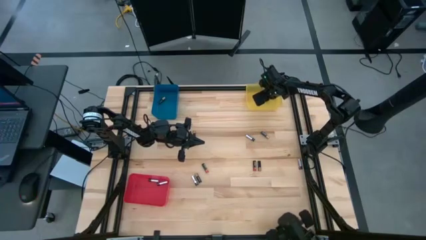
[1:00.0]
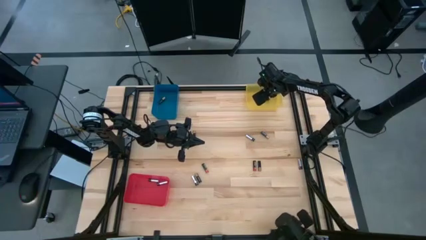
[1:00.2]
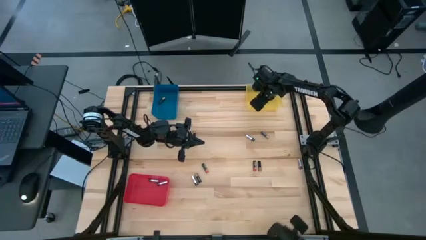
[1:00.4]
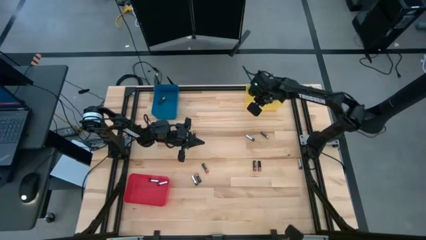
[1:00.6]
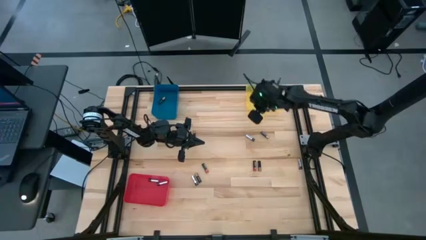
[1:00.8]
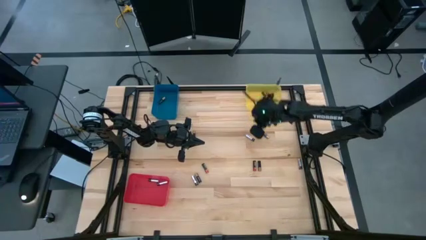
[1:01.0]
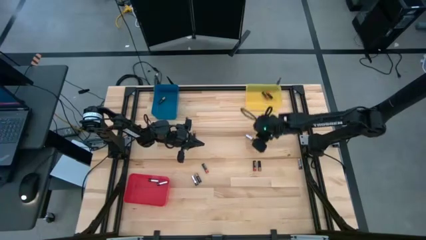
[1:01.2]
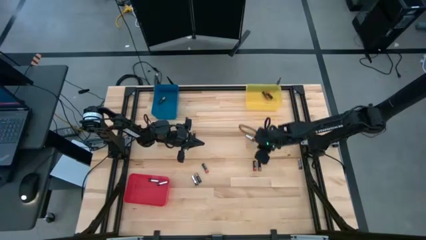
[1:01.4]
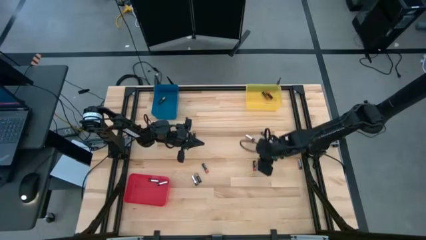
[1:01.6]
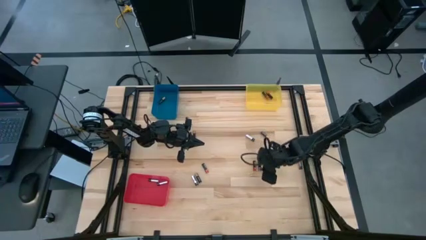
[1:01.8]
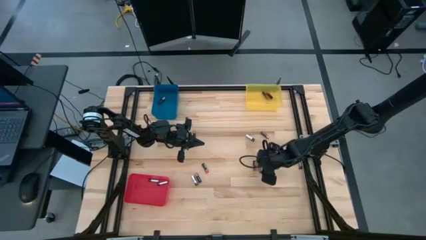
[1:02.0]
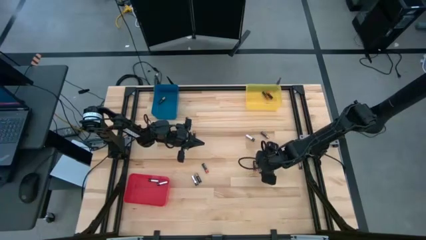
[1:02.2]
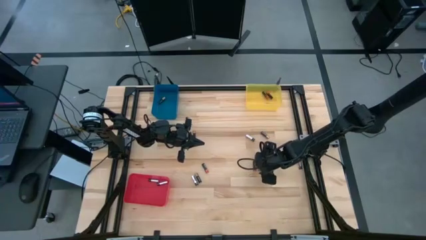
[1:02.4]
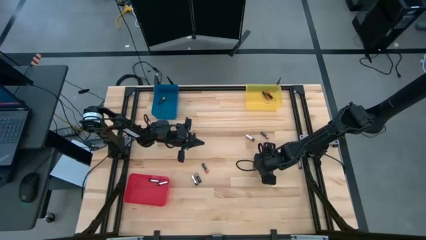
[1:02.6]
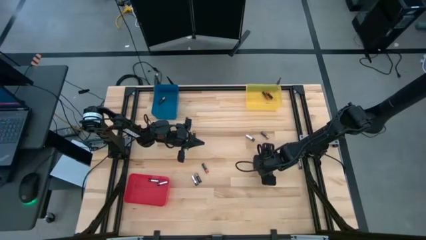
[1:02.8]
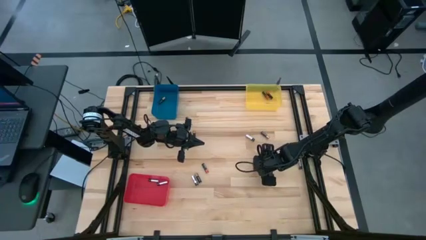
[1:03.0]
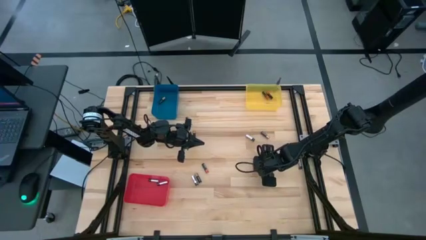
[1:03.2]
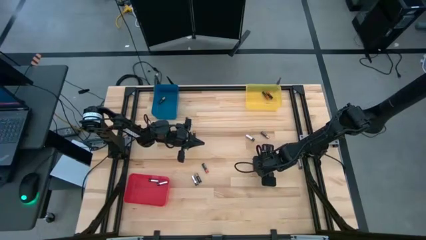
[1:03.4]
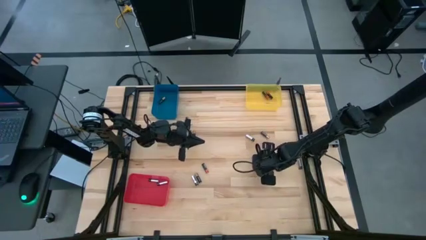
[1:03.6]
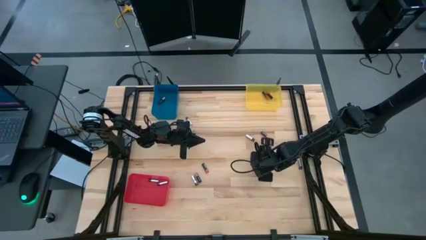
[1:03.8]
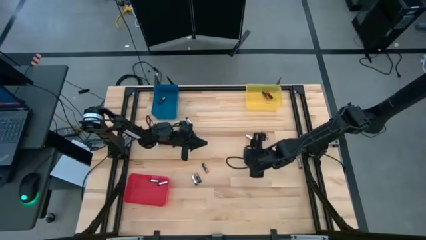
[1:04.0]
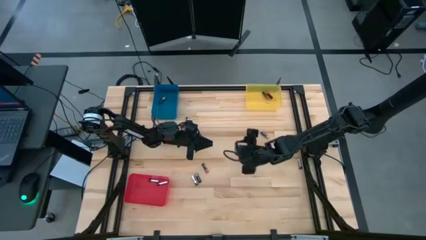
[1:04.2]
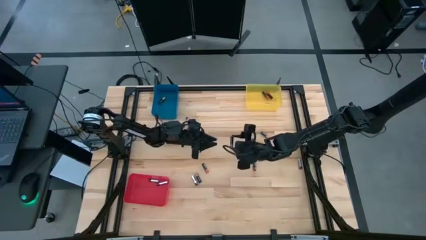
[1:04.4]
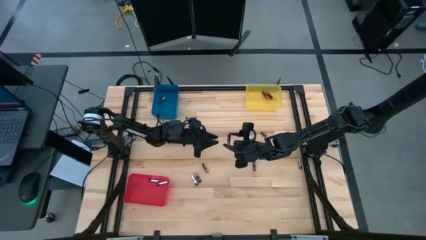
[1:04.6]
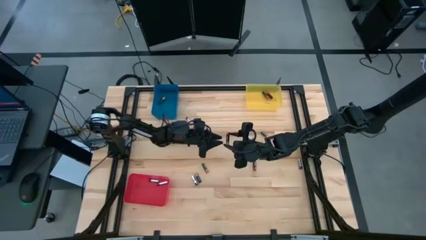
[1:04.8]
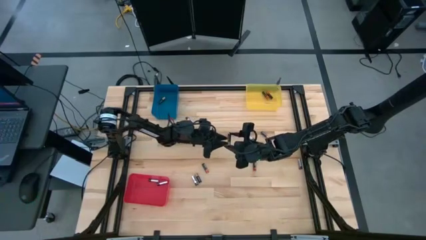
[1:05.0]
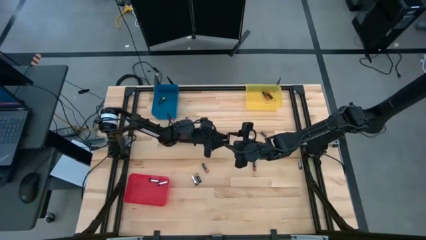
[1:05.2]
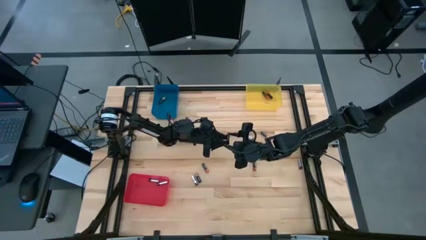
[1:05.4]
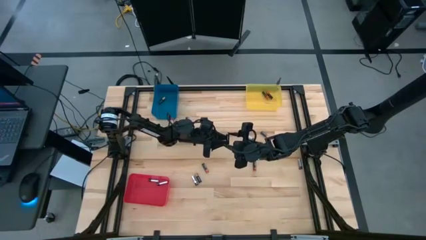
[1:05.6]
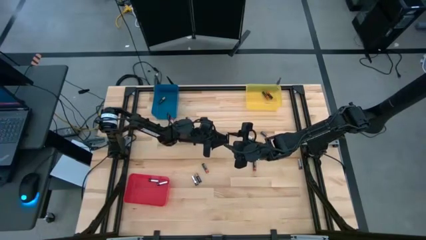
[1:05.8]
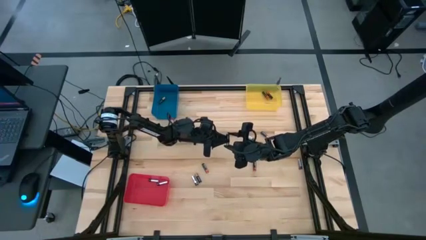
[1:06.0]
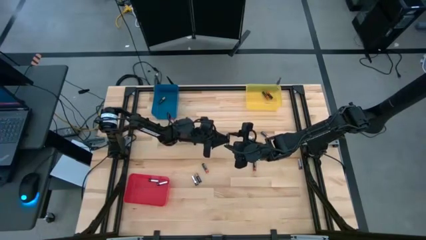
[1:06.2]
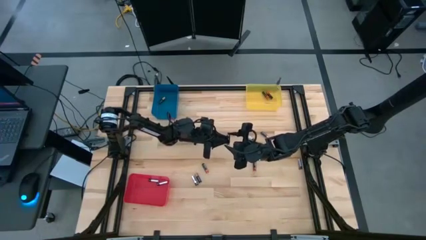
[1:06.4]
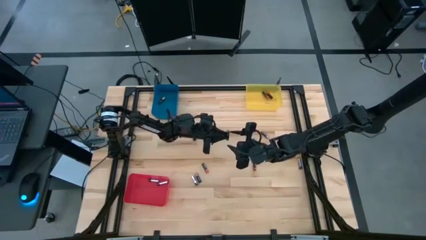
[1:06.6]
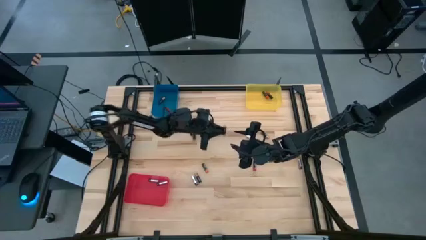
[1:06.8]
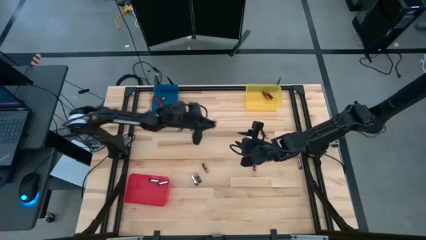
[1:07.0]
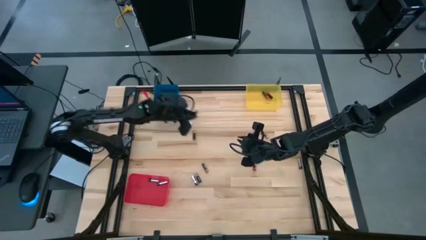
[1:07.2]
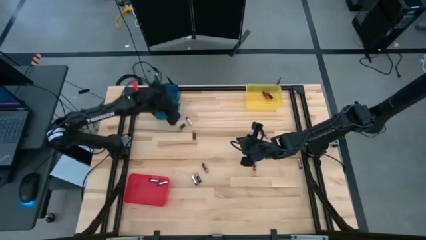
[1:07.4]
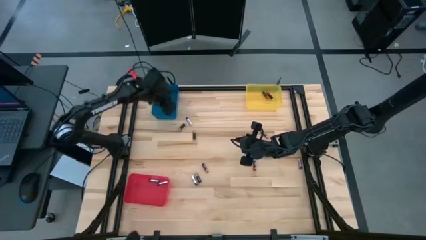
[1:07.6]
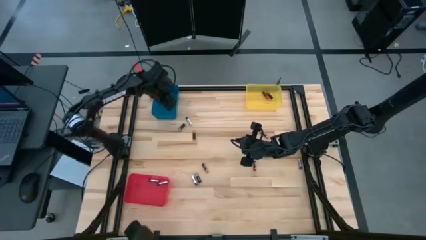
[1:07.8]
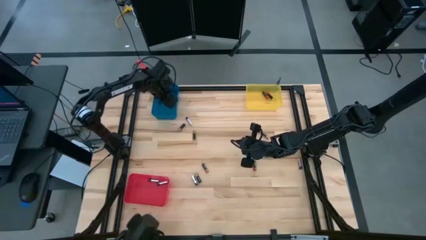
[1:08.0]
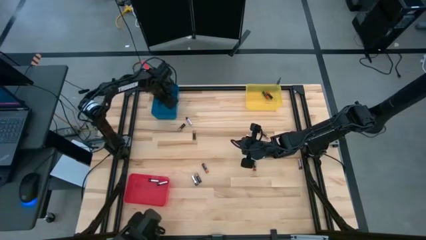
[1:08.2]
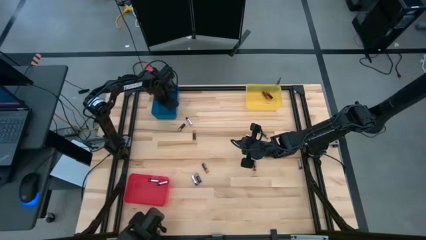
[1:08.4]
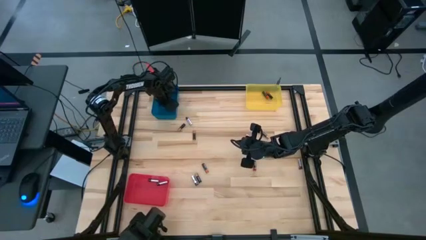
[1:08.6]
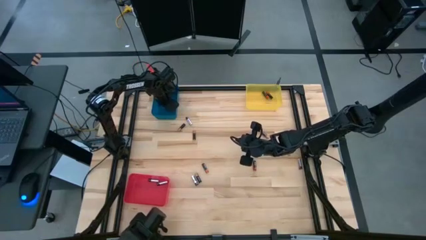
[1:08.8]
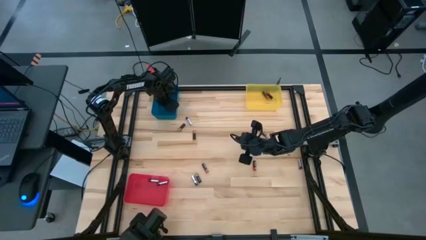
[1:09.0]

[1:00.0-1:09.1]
Task: Sort batteries
Put the black battery into the blue bin

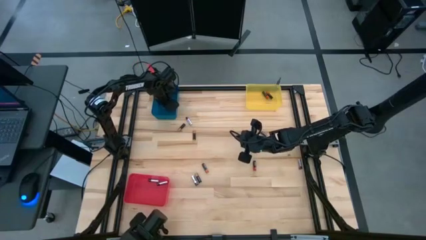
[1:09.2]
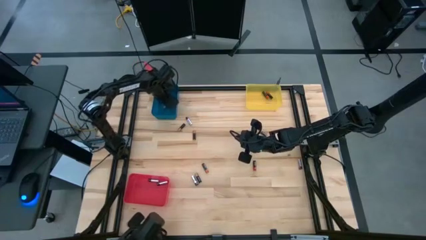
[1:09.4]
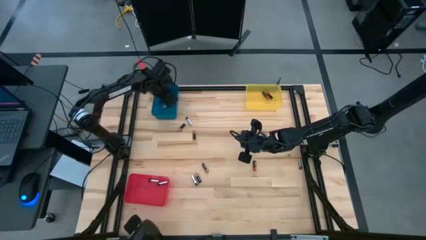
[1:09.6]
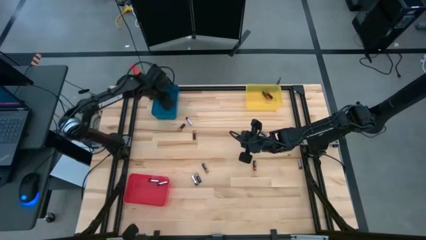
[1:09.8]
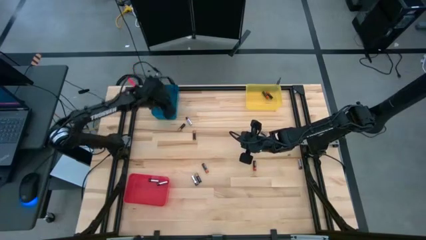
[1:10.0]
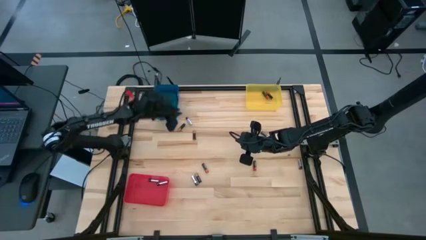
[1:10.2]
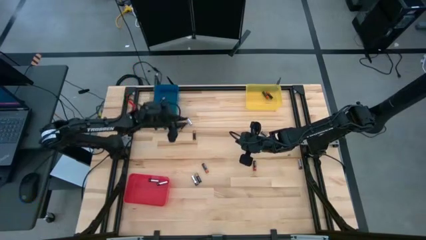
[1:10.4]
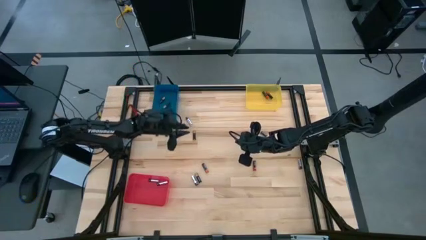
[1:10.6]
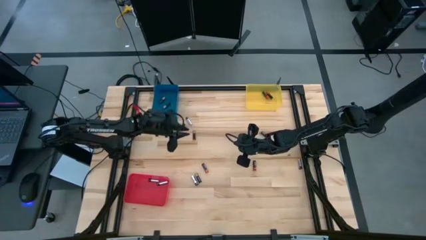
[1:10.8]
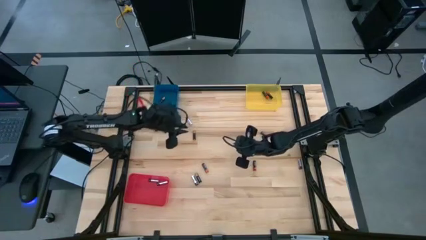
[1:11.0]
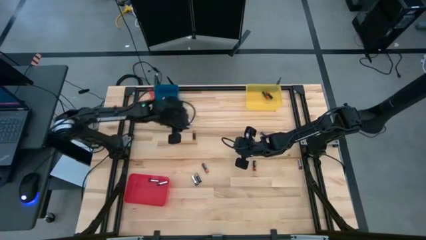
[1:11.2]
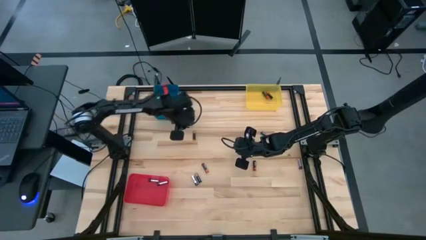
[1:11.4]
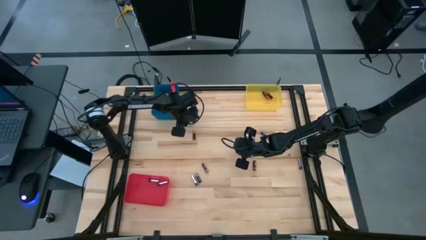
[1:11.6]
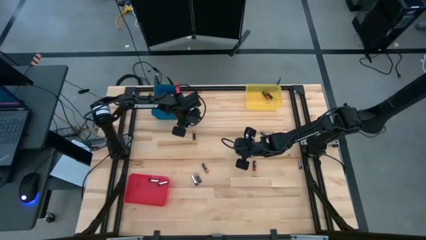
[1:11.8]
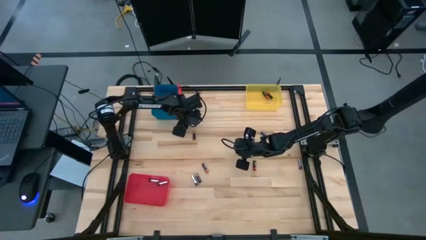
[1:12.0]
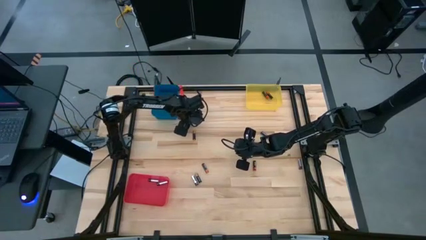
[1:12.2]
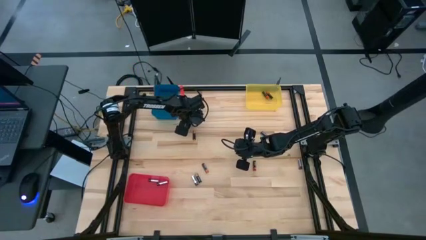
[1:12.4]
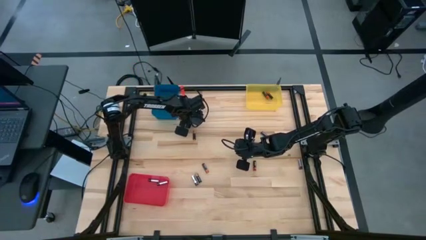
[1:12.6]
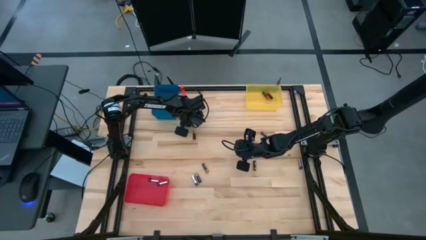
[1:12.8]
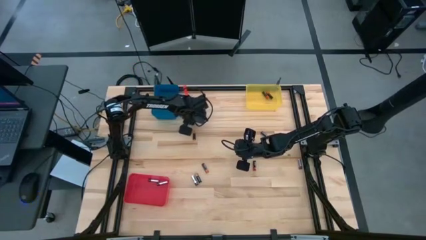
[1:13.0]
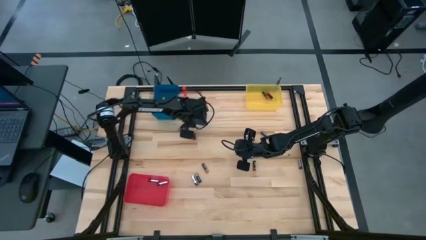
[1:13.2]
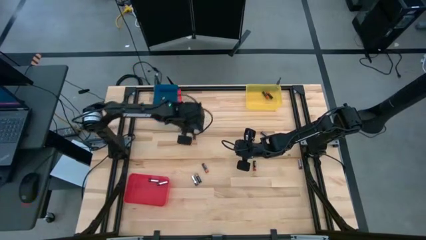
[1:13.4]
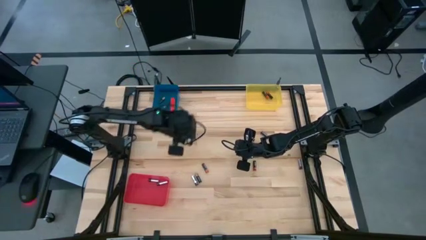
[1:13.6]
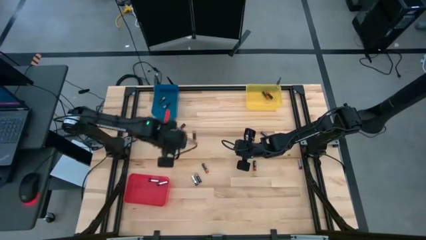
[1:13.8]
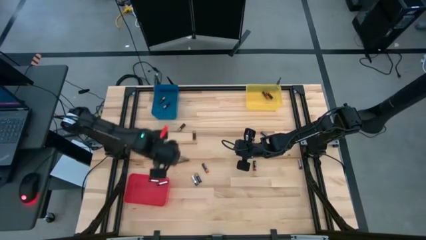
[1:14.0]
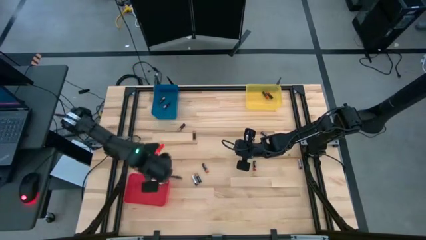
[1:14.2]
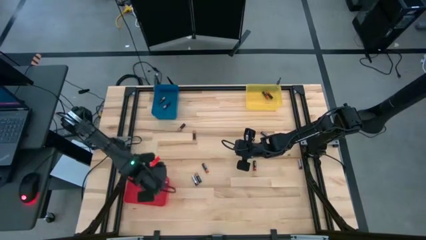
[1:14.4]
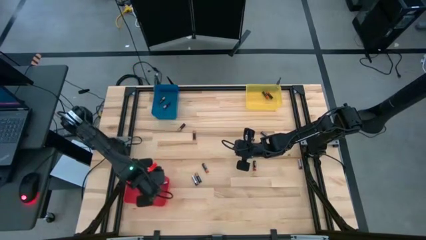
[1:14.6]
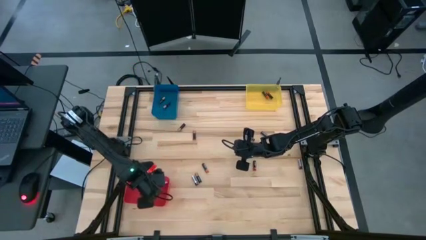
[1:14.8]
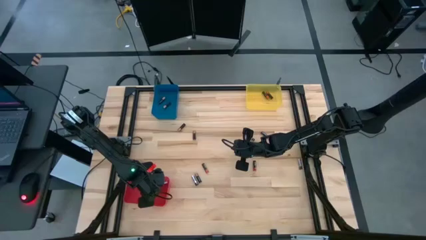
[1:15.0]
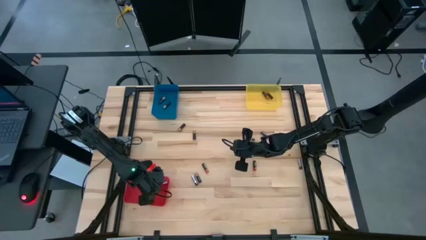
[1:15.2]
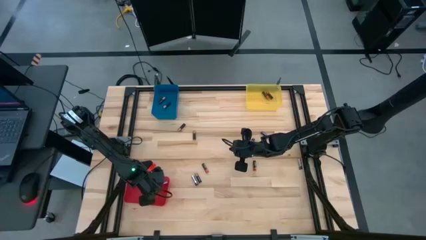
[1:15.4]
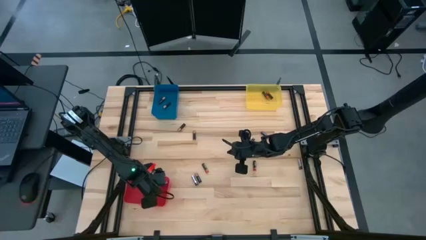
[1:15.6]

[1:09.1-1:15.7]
Put the silver battery into the red bin
